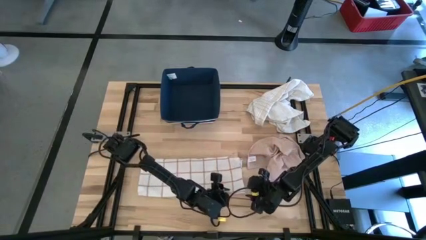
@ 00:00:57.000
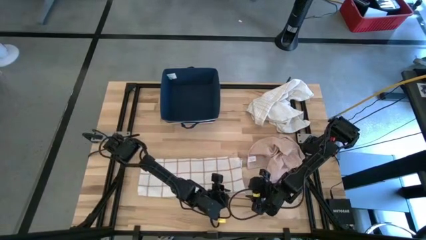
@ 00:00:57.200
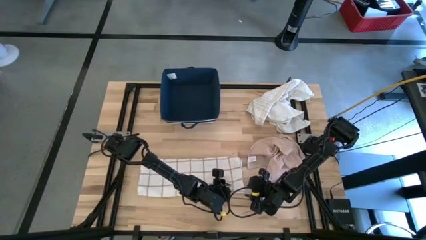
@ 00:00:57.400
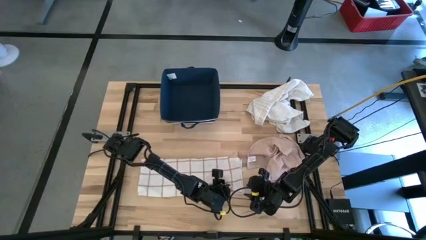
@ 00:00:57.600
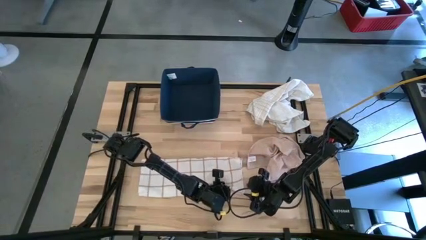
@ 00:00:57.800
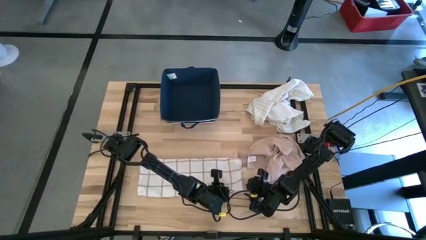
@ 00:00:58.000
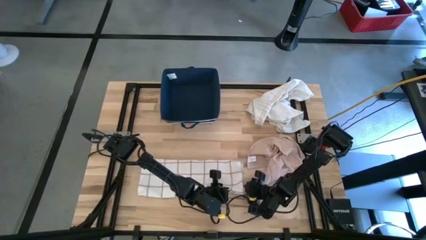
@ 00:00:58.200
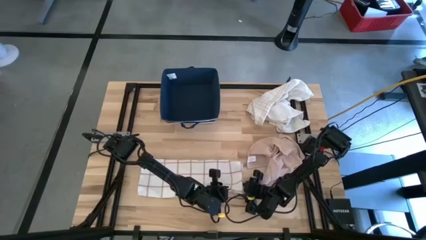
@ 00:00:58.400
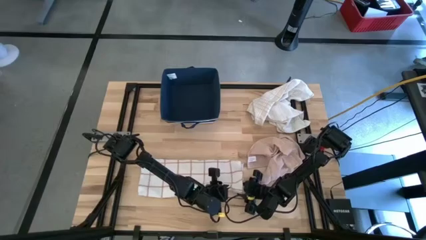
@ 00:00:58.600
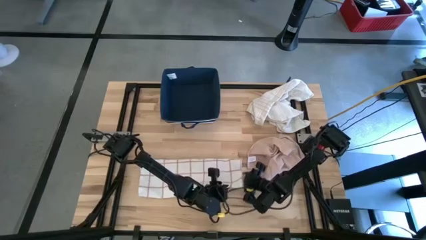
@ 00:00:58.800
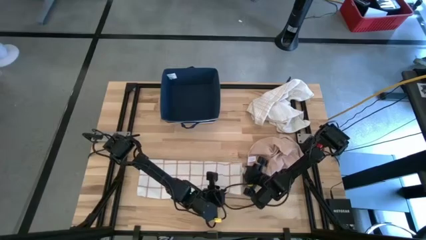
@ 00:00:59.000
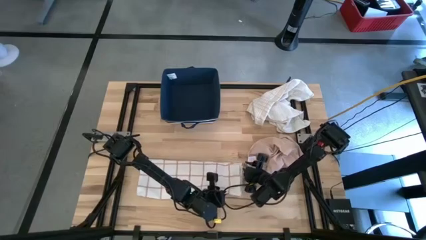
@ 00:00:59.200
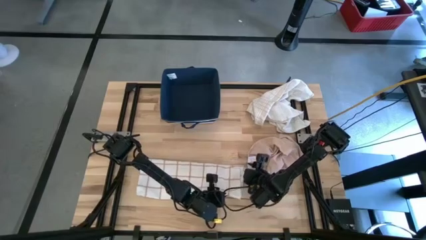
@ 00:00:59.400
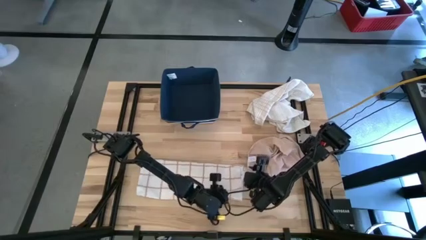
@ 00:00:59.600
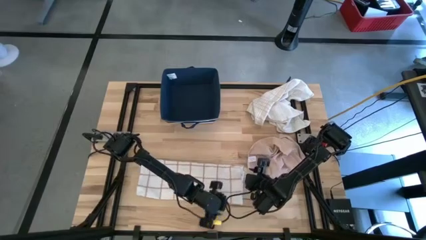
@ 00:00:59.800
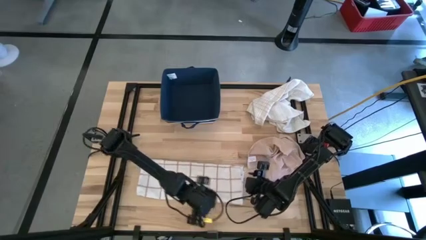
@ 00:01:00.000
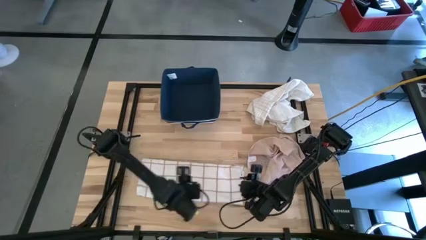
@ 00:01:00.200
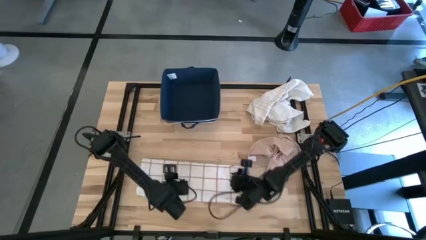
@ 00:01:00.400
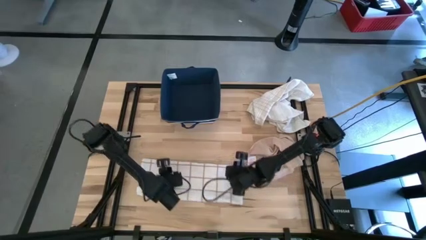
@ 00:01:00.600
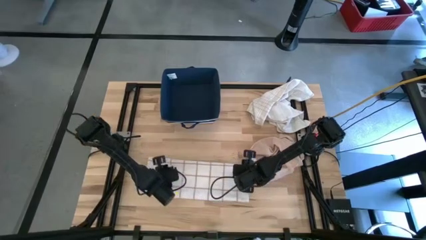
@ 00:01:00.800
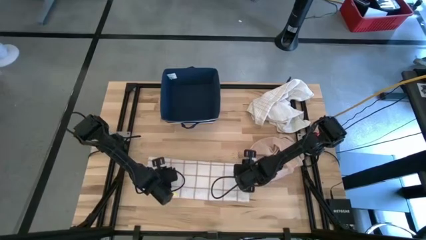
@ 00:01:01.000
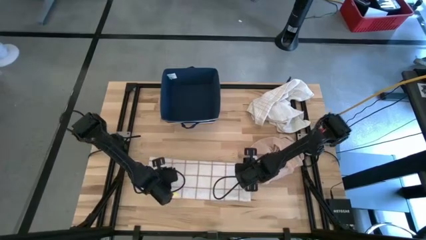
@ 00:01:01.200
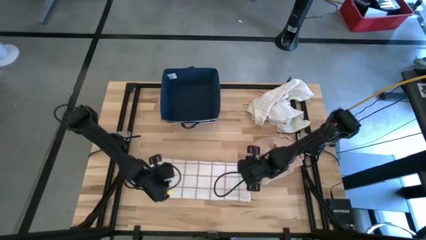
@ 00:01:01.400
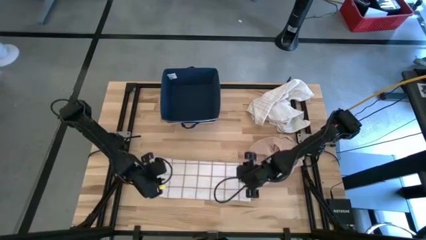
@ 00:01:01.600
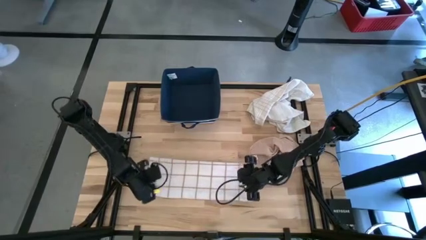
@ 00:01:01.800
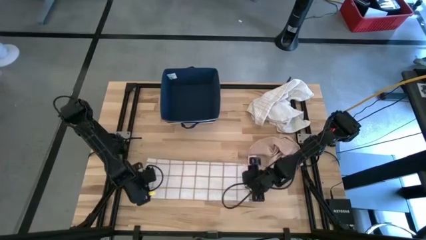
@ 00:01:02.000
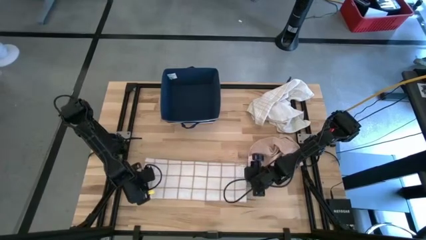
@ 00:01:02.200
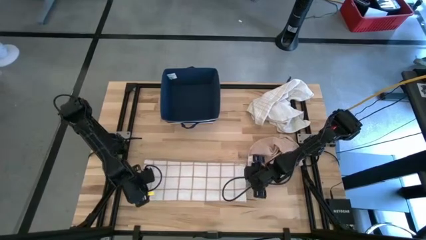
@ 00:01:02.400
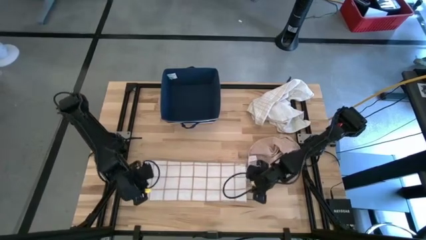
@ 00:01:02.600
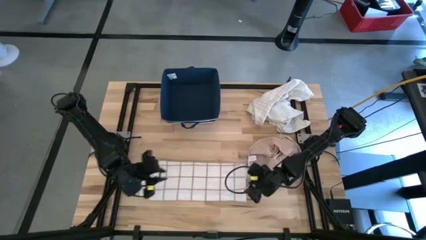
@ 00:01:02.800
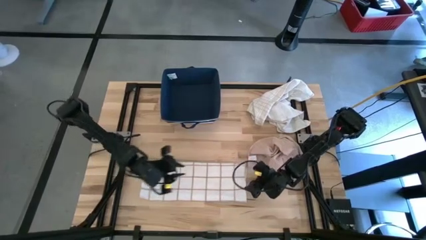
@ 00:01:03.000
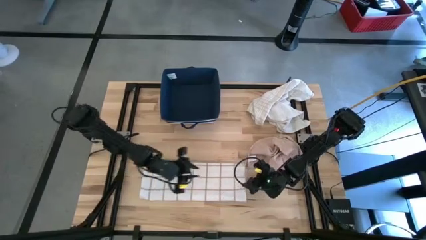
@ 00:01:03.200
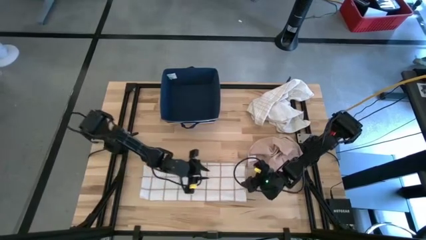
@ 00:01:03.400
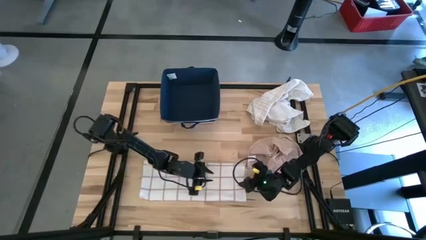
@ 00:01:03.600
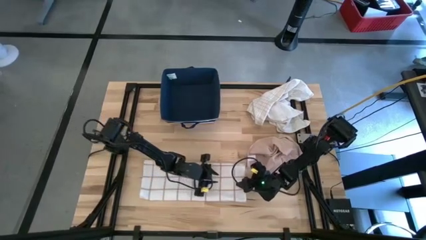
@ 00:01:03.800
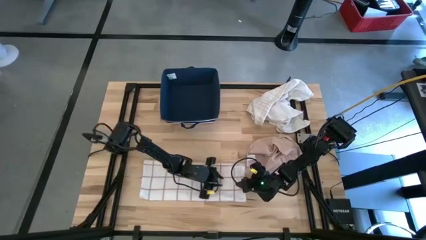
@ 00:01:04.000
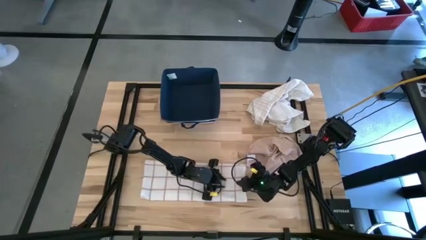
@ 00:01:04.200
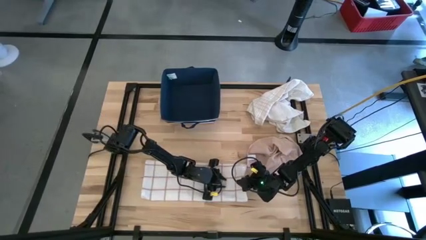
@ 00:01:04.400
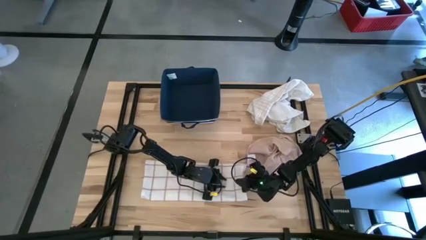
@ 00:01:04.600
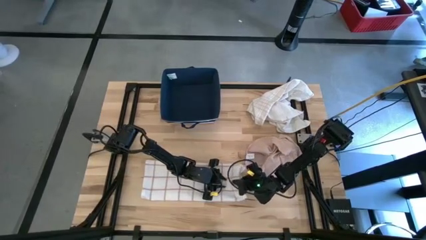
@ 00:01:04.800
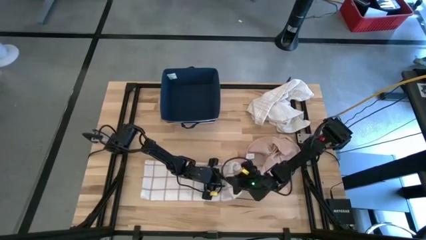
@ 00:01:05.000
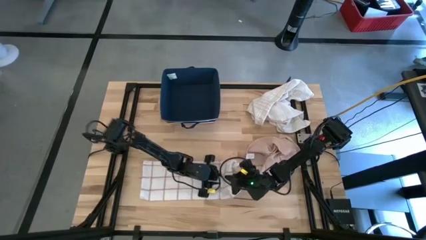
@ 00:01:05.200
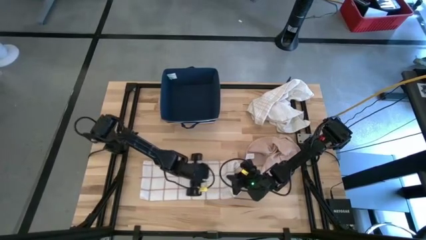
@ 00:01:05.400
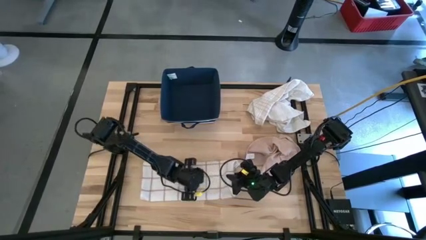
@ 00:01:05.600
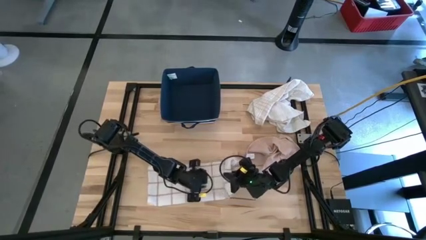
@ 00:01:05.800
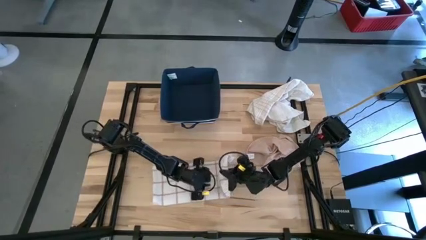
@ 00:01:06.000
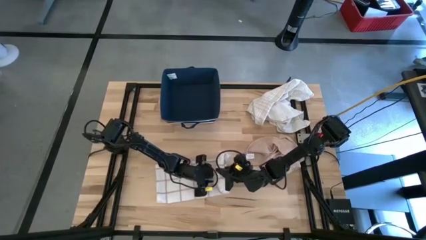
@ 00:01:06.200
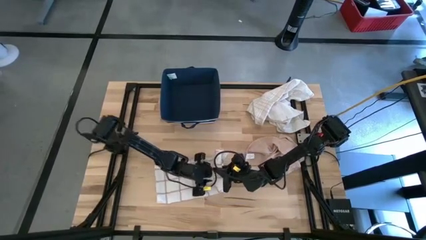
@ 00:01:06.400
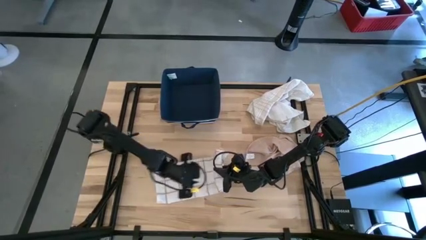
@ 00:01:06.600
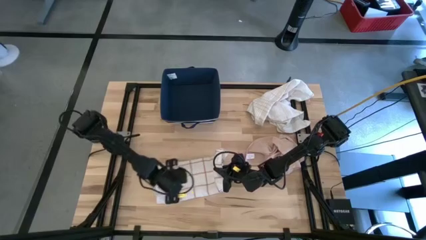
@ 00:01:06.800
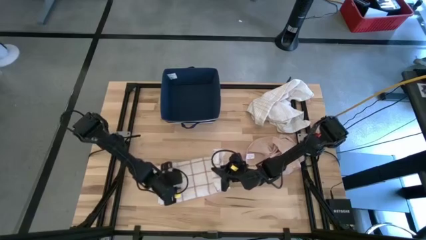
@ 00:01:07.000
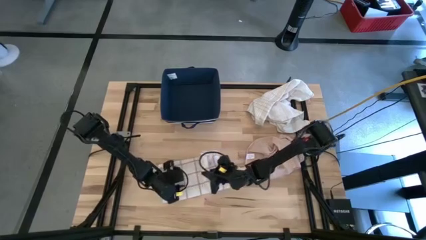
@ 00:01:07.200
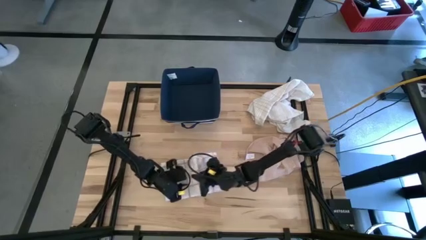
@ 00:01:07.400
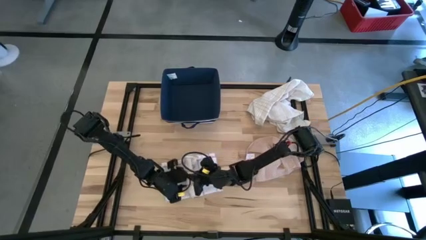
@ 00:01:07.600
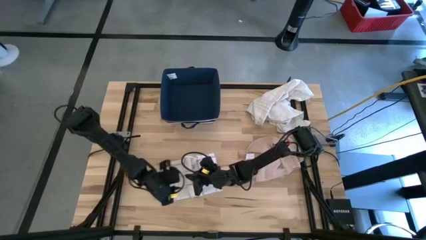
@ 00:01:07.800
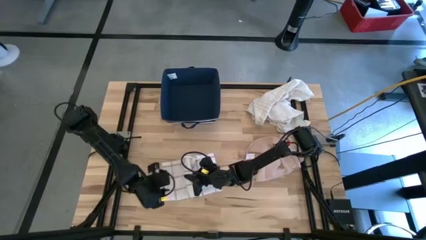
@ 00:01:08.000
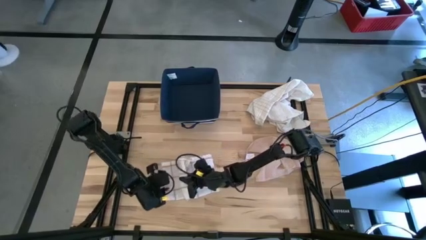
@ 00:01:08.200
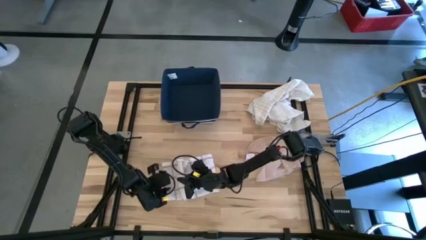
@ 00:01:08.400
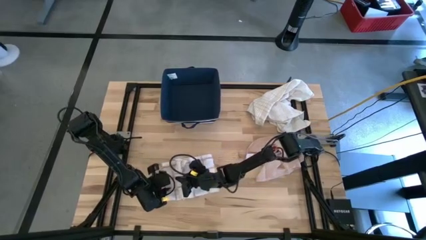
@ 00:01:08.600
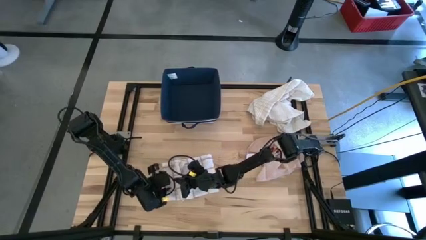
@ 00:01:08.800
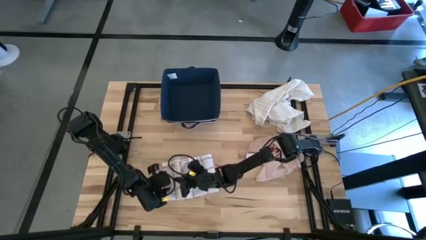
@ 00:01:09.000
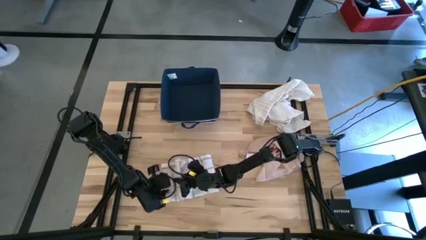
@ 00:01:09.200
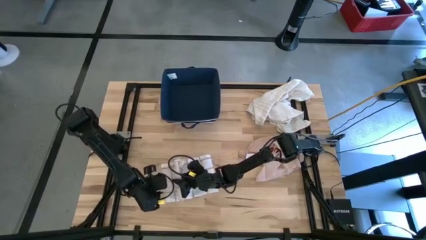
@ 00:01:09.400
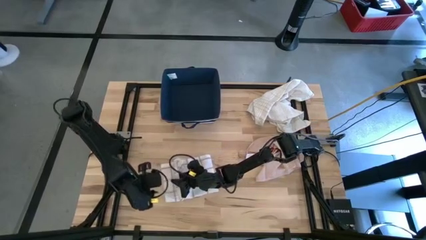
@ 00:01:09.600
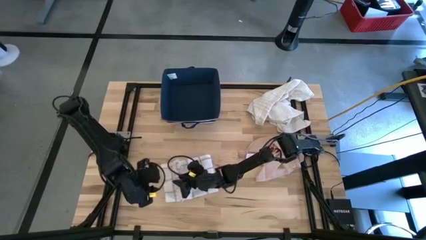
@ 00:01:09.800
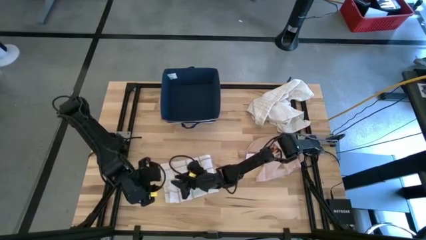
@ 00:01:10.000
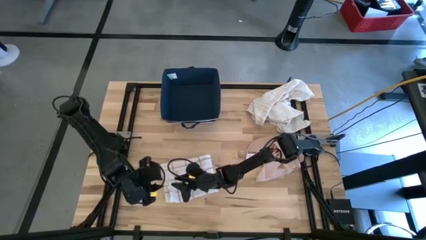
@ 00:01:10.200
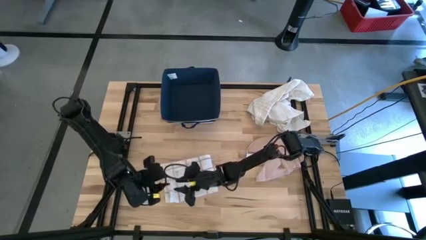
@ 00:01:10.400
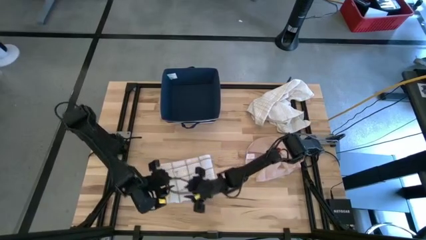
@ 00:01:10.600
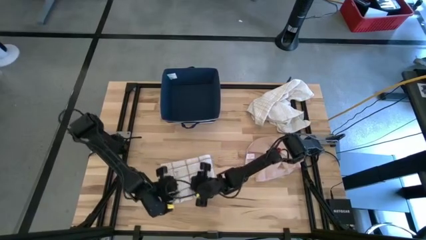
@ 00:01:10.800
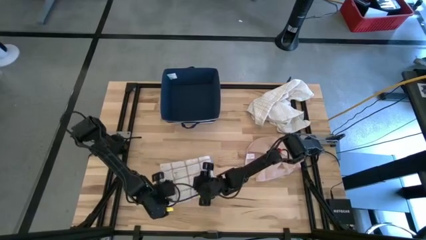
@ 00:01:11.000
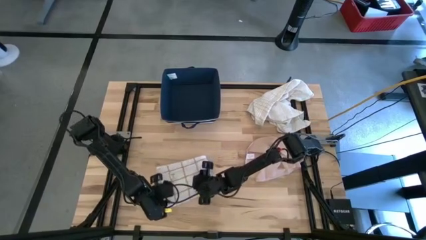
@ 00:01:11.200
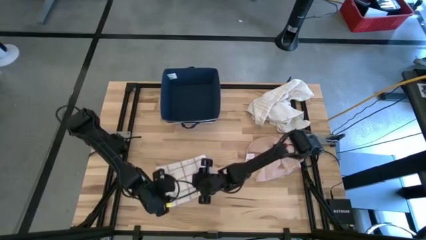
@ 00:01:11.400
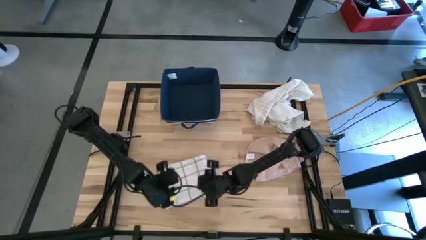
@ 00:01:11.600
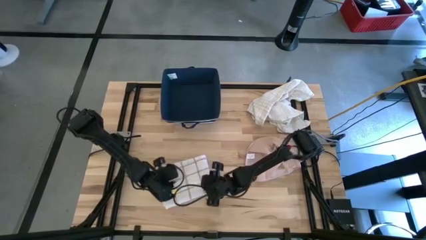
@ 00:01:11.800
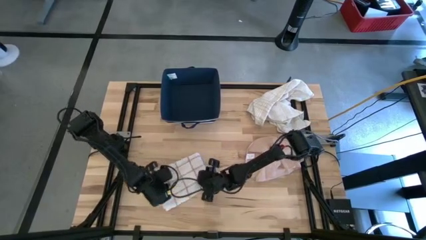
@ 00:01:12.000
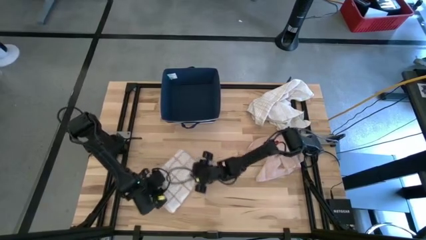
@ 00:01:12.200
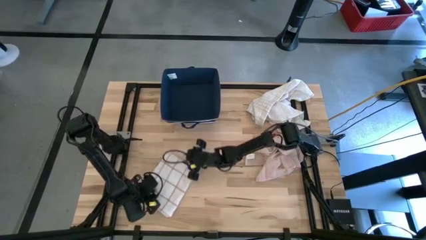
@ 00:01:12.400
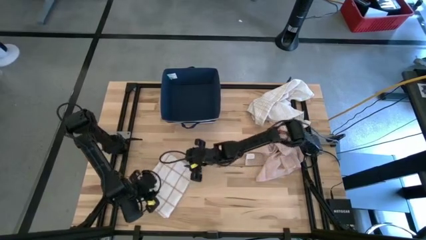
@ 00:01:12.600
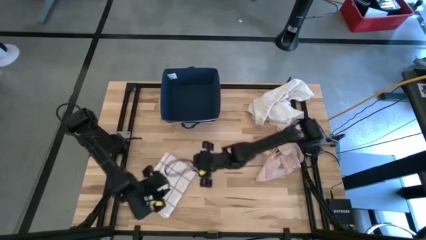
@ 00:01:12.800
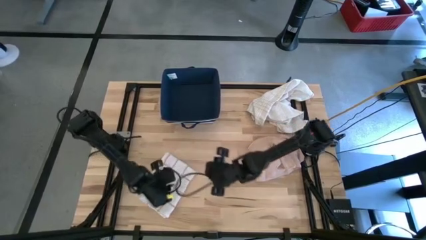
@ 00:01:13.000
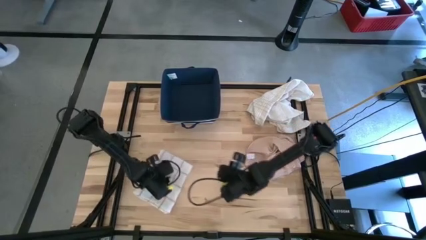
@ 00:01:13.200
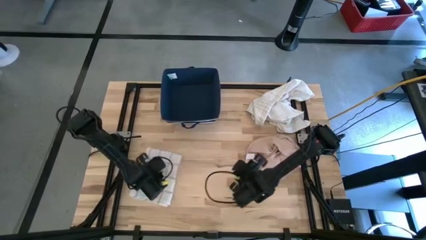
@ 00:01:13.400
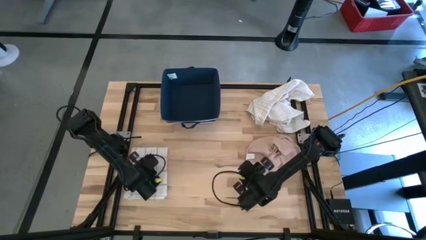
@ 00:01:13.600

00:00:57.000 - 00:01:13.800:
Task: Fold towel
Fold the left white patterned towel
